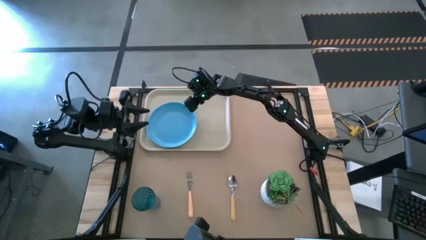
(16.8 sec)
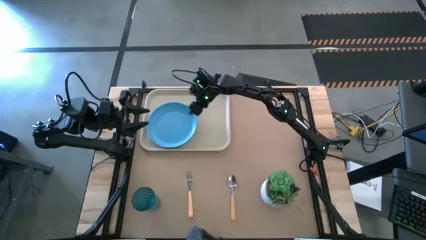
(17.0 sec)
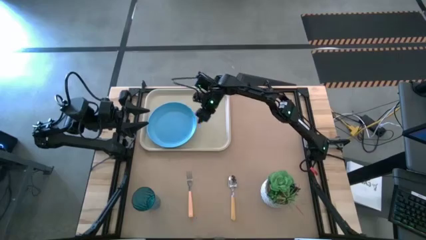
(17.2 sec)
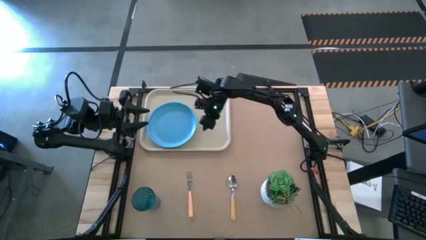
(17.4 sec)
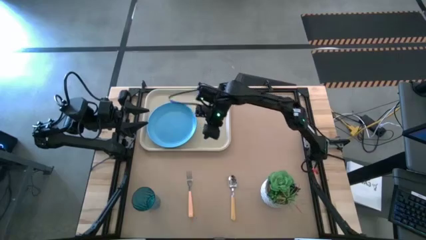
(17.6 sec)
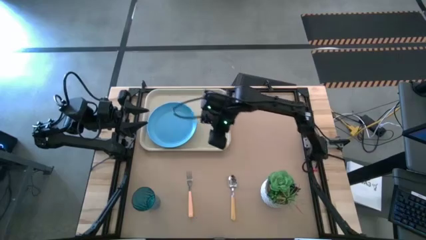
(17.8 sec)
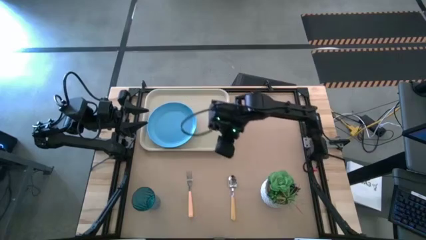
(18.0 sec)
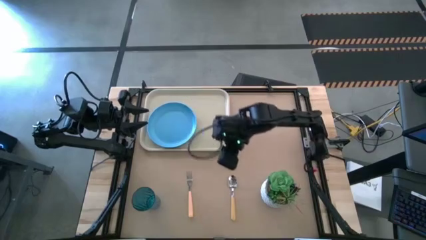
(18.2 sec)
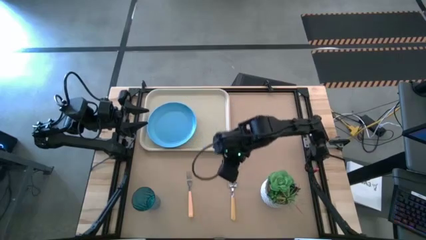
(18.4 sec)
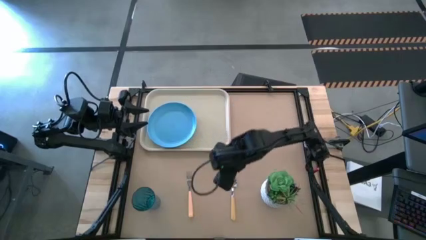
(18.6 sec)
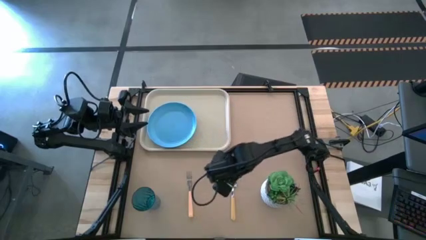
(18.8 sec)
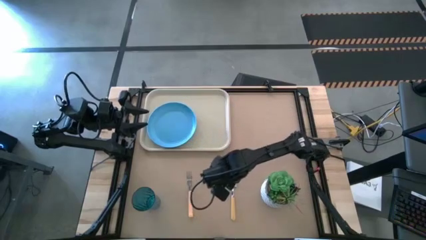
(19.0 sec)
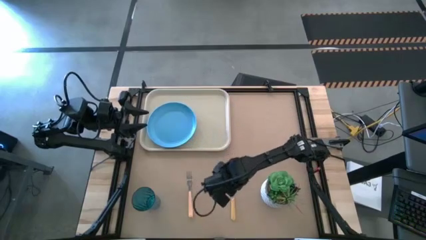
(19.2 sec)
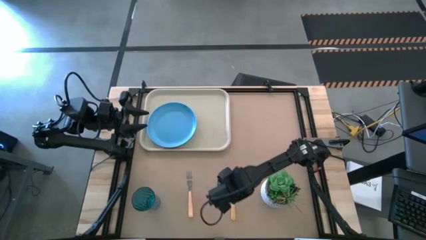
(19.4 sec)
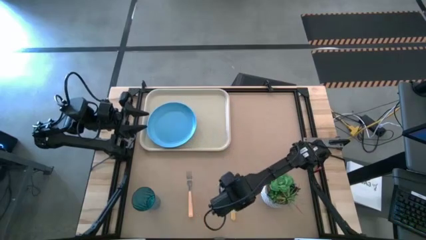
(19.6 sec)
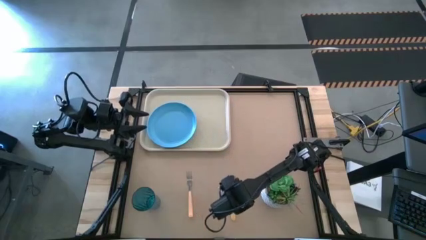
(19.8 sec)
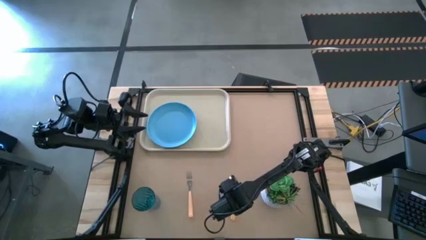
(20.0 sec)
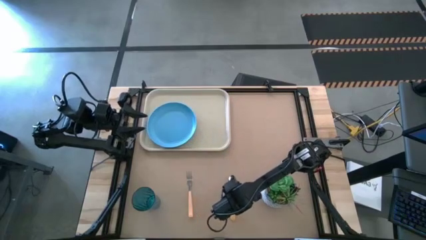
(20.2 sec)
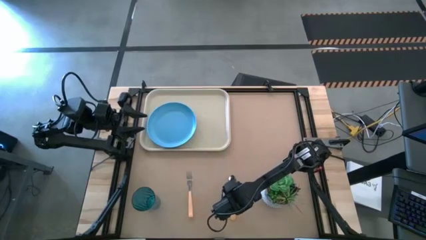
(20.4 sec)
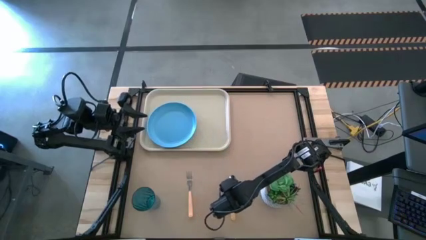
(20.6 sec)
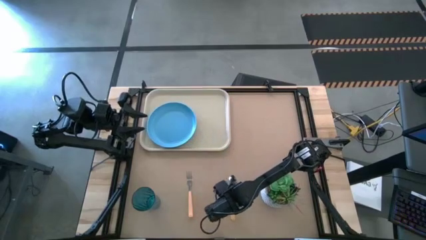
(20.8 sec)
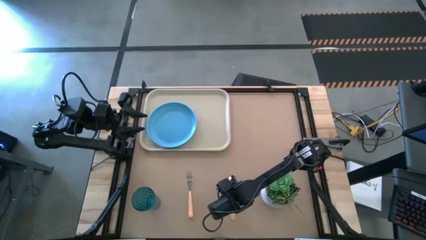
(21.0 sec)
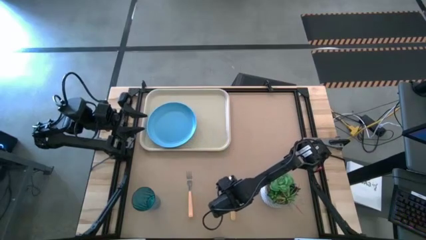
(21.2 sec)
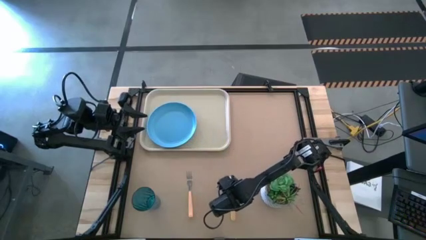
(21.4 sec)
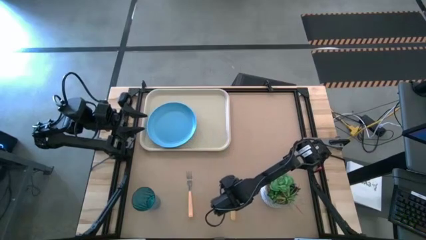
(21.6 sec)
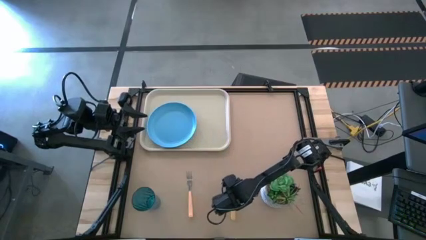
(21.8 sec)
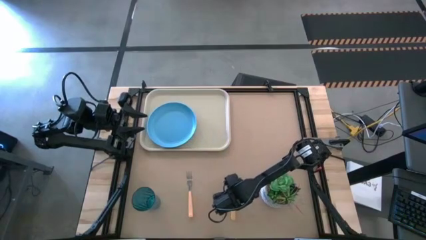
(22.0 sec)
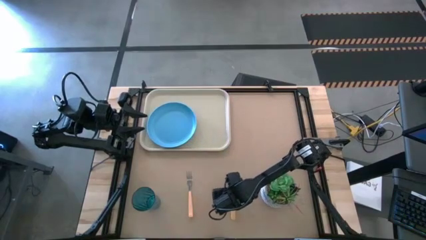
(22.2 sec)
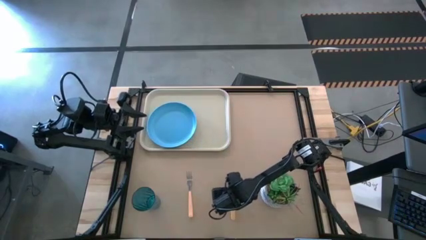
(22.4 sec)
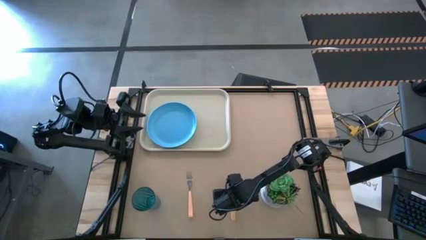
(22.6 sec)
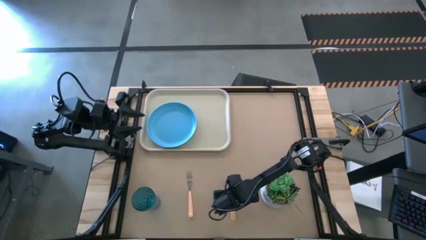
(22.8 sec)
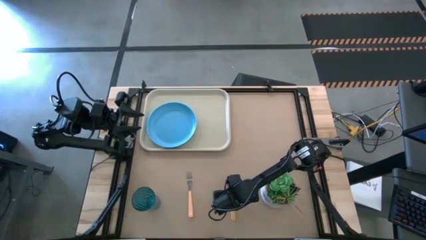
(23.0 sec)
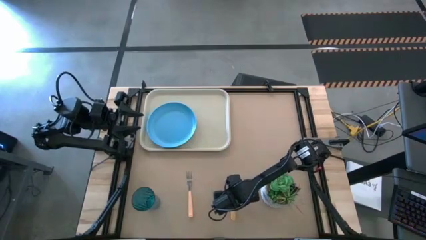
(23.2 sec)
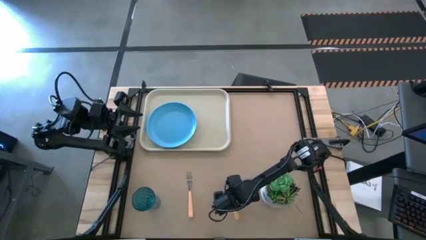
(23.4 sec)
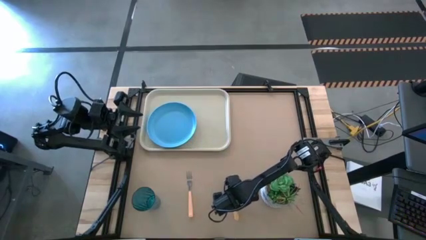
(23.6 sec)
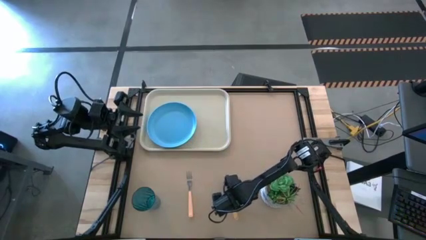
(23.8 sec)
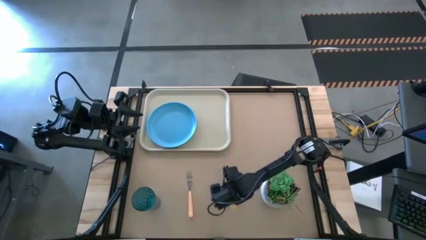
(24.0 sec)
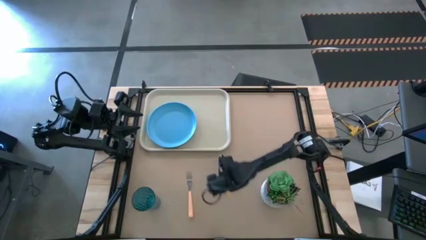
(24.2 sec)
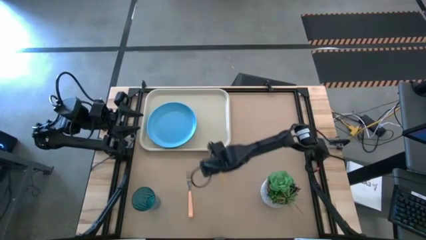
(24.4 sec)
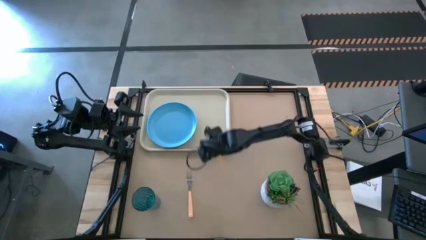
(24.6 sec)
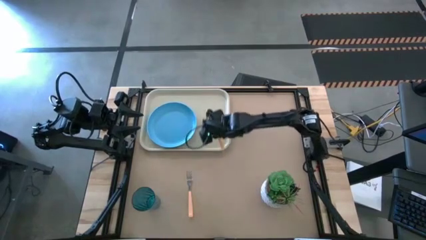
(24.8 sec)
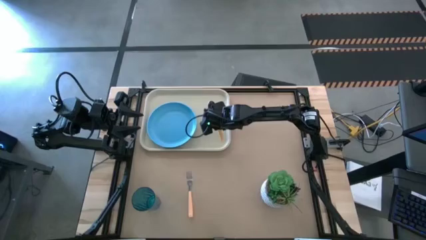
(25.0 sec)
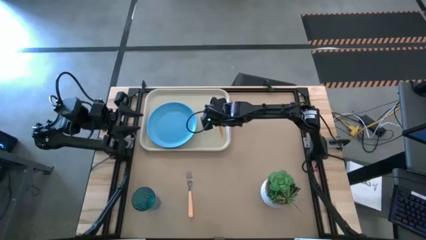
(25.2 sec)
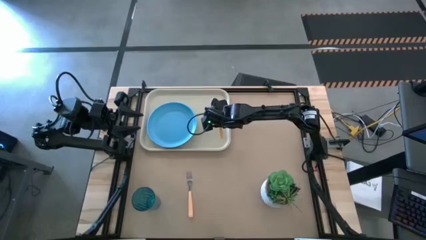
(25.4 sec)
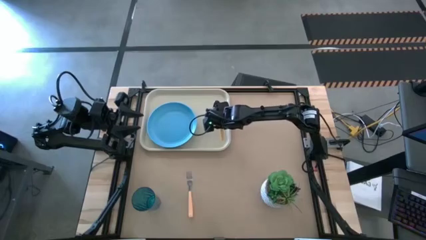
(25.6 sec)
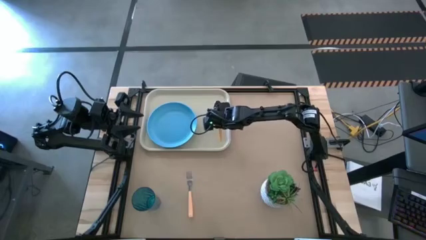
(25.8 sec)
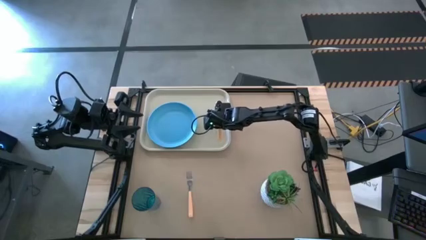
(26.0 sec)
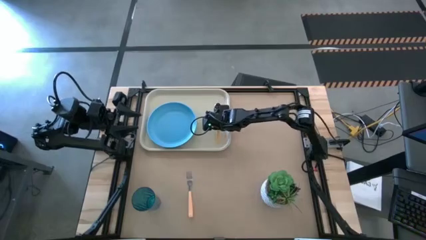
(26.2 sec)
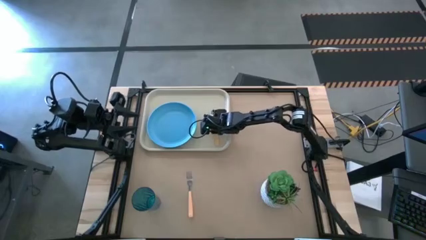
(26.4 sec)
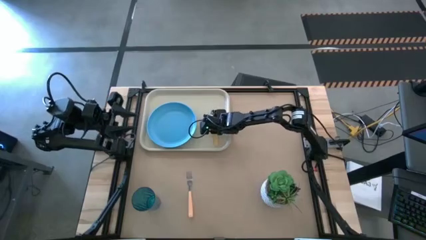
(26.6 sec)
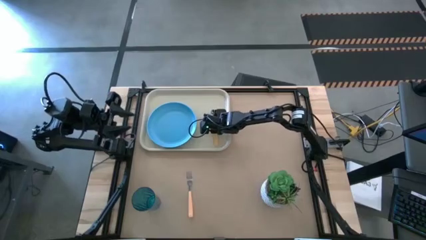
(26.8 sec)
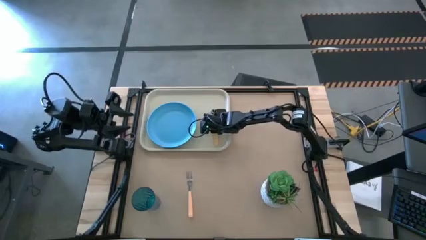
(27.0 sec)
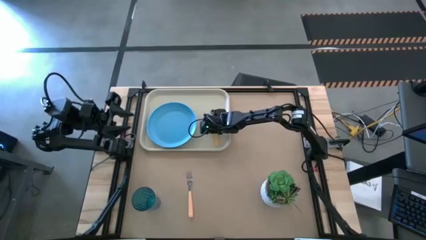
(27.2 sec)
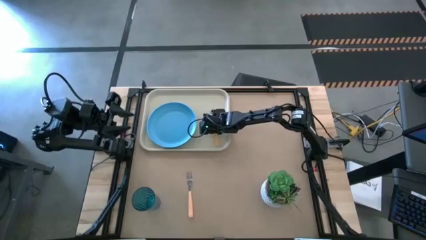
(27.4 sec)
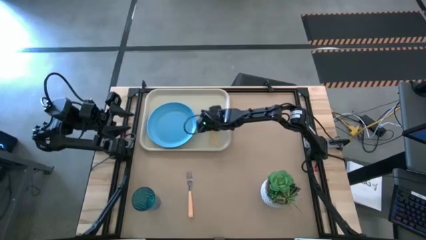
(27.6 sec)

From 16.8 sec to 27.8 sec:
Task: Pick and place plate/cup/fork/spoon on tray
Put the orange spoon on the white serving tray to the right of the light blue plate

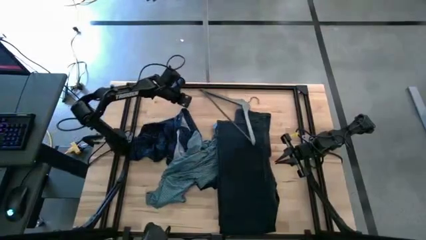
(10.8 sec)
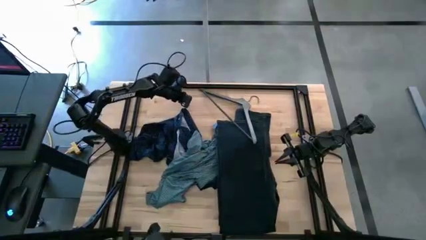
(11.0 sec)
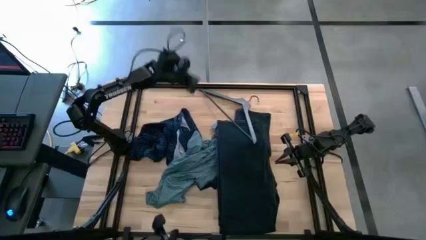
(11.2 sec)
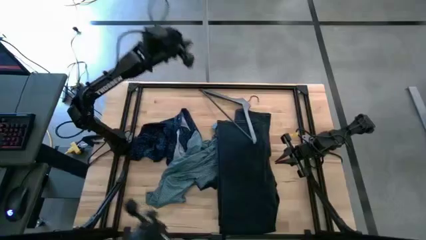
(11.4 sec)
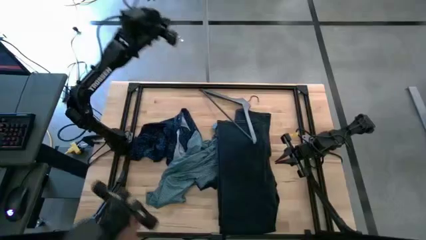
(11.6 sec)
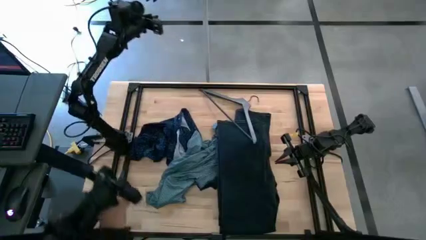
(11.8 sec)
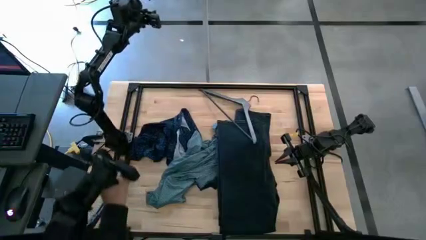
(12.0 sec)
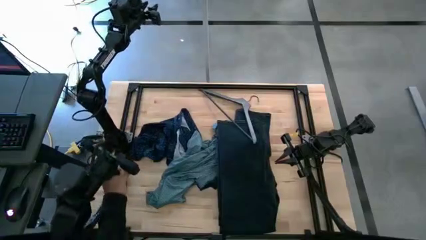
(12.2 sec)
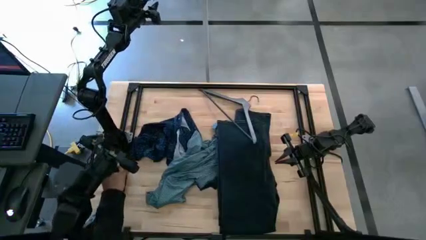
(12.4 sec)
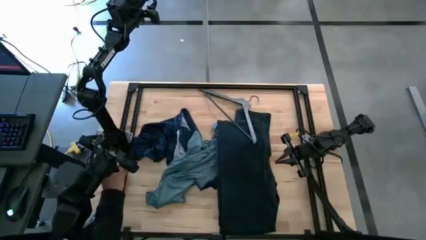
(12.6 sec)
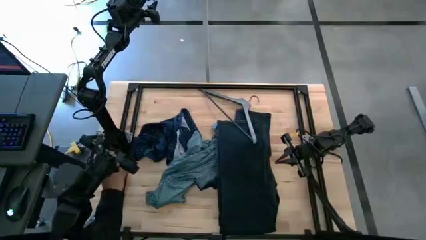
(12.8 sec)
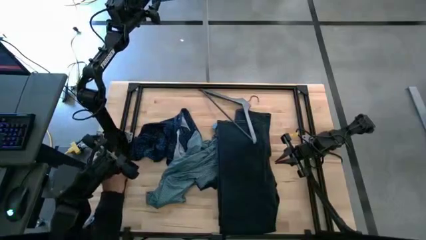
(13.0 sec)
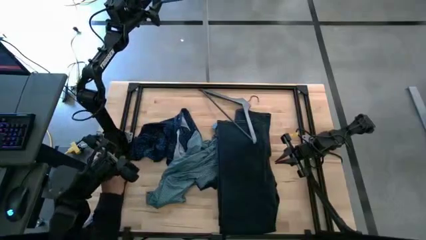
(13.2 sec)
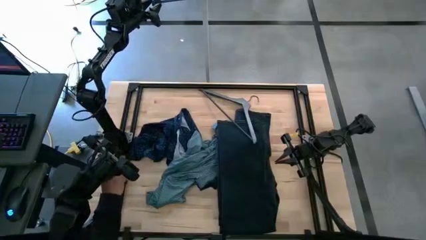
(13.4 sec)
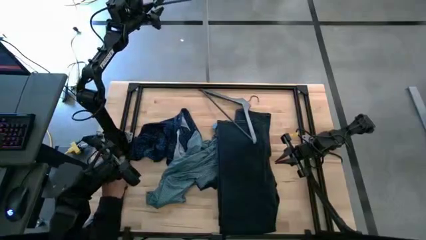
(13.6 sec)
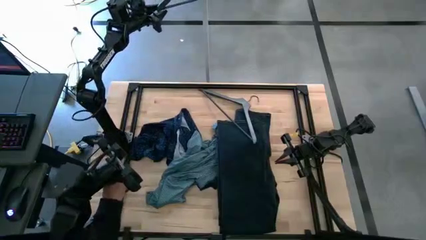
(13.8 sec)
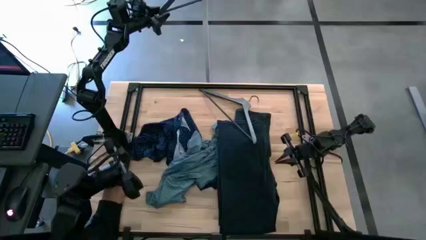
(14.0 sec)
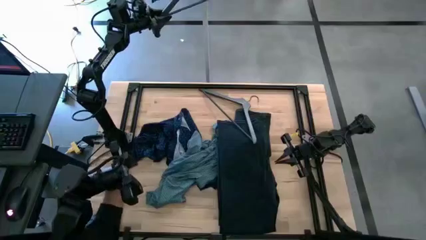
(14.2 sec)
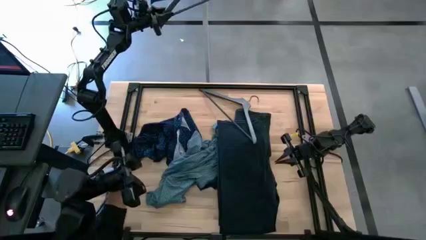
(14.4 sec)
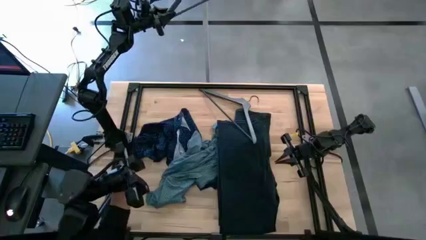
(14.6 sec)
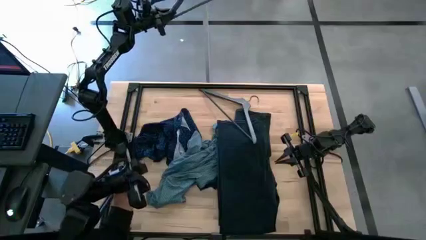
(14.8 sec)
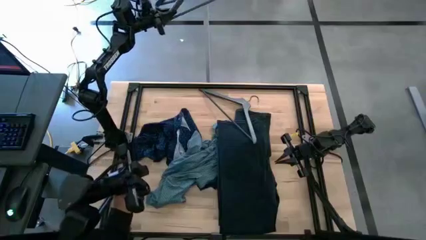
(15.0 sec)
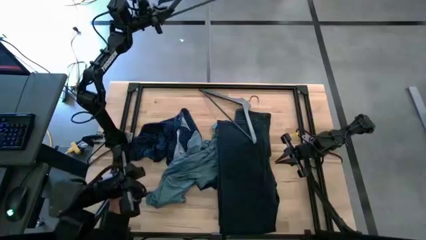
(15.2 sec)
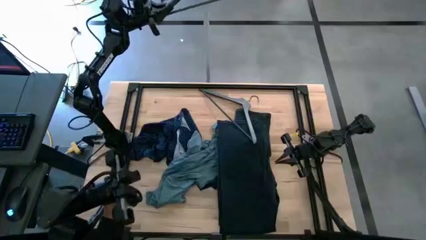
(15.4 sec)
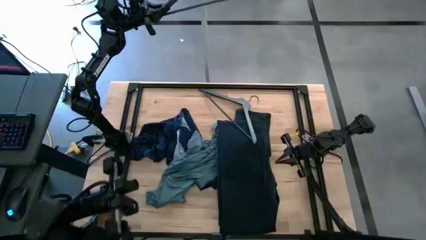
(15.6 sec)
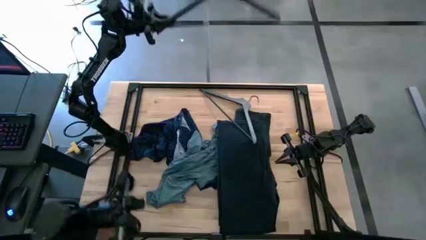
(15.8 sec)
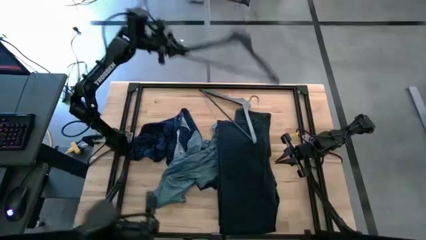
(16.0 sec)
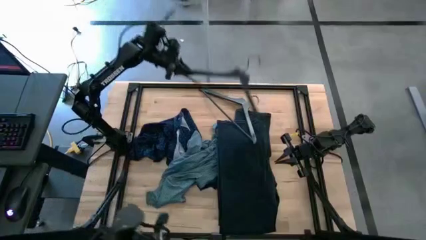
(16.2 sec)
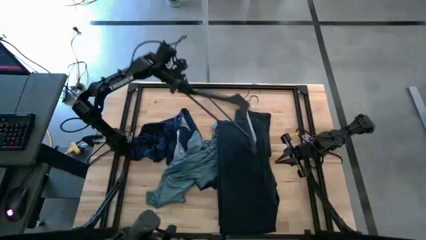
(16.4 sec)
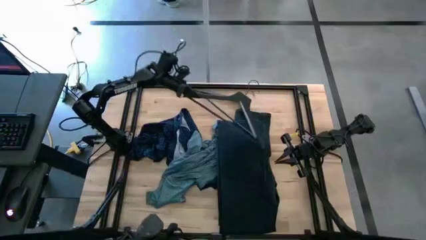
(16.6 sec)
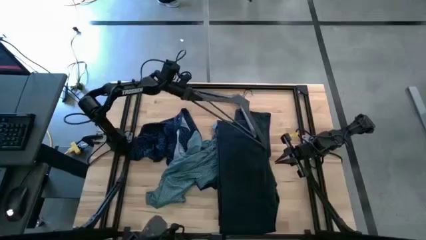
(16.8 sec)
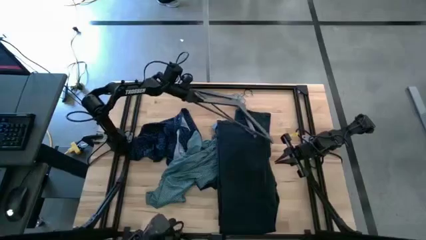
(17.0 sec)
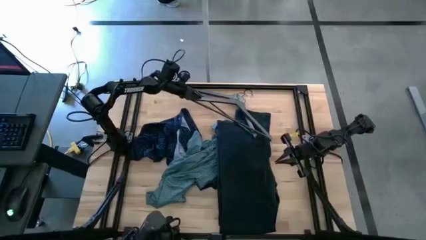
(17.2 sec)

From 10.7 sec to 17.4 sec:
Task: Hang clothes
Unhang the hanger from the hanger rack
